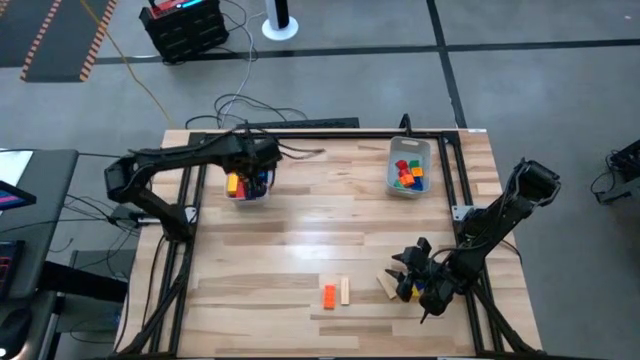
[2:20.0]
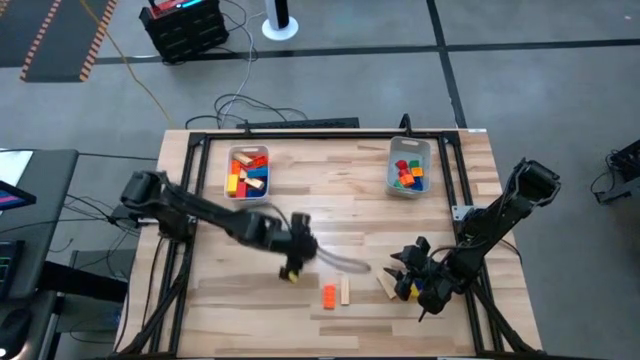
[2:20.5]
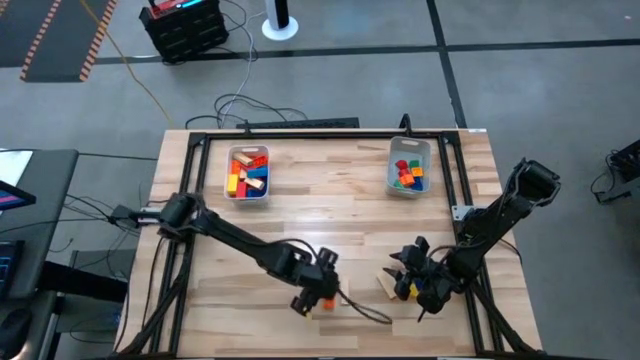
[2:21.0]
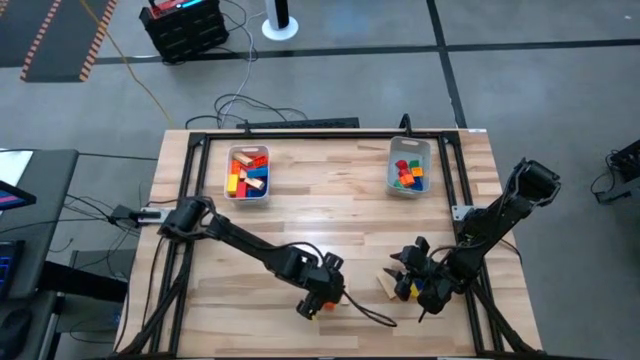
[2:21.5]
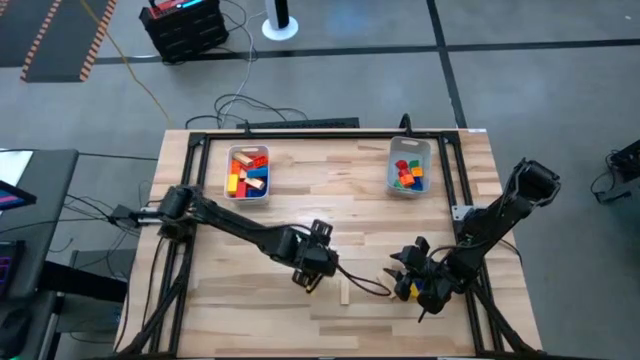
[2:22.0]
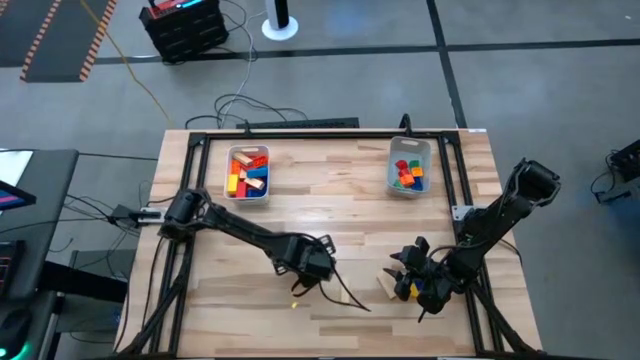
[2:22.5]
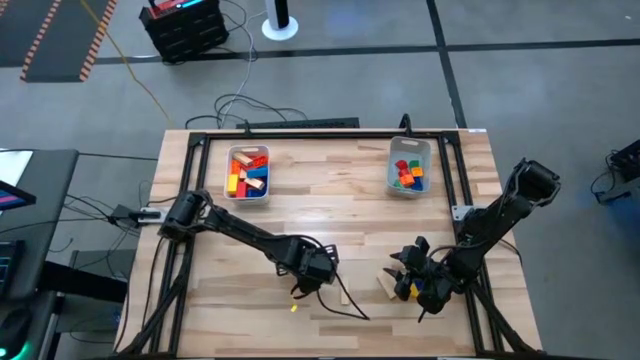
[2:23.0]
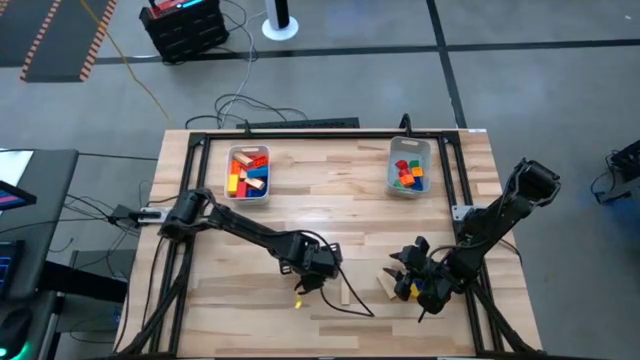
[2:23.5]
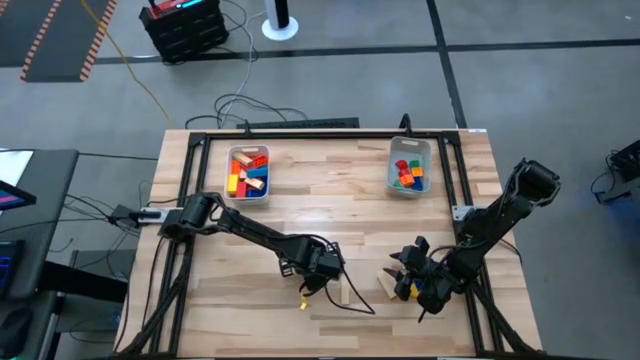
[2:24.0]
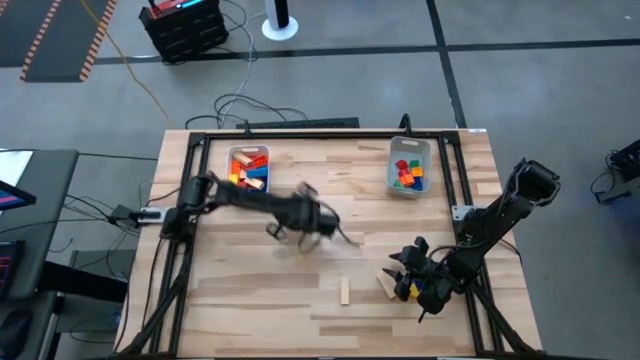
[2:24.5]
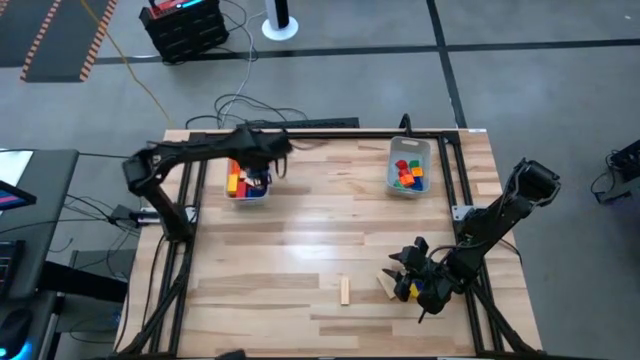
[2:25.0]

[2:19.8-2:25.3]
Task: Sort blocks by size
Put the large orange game piece into the white bin

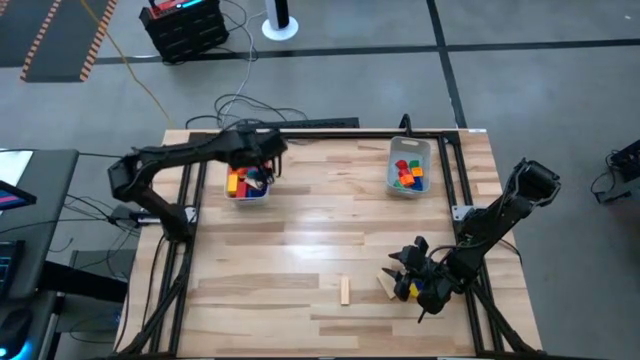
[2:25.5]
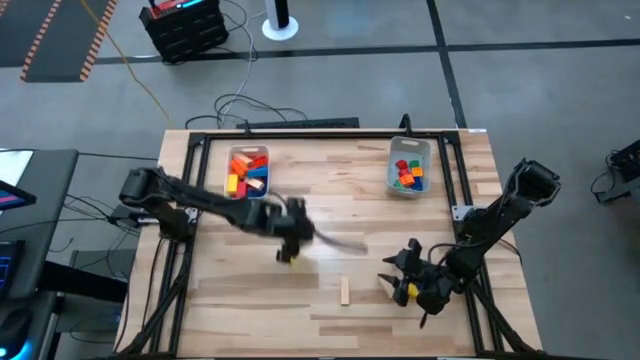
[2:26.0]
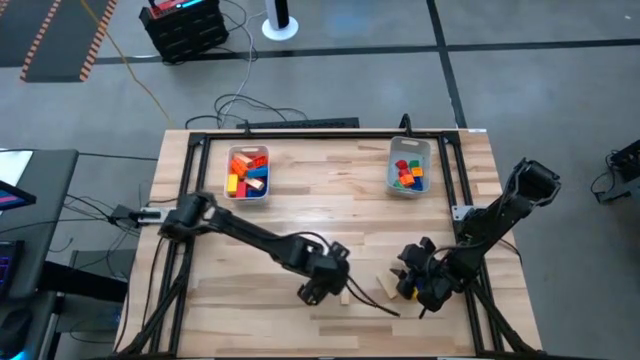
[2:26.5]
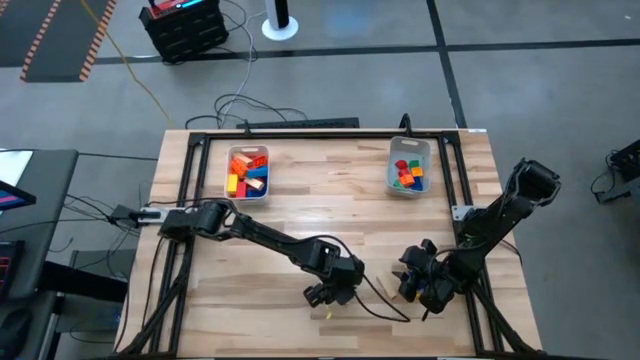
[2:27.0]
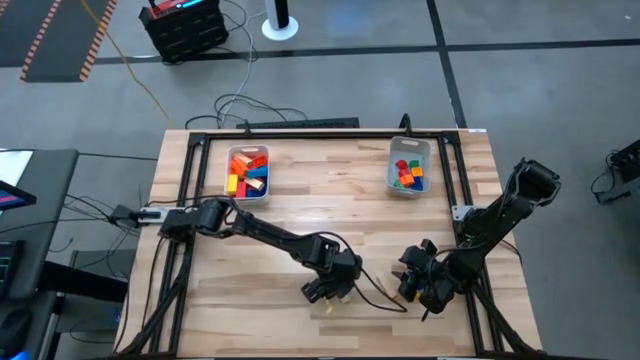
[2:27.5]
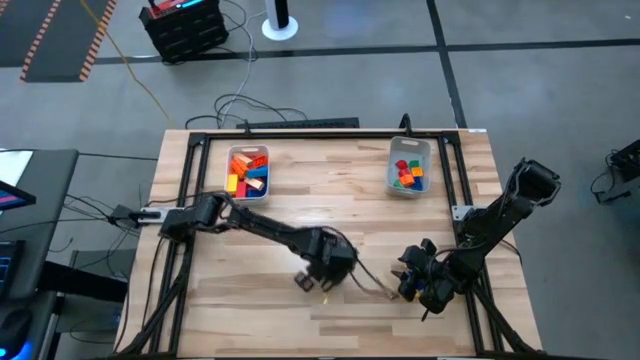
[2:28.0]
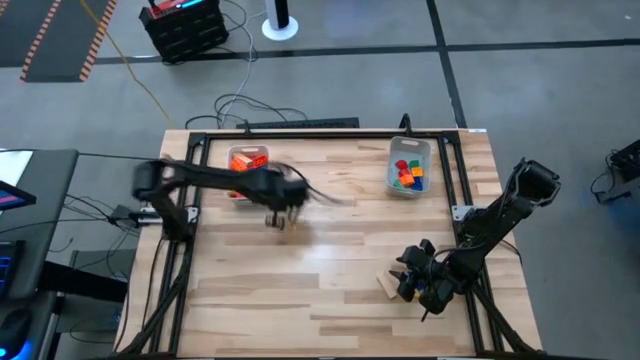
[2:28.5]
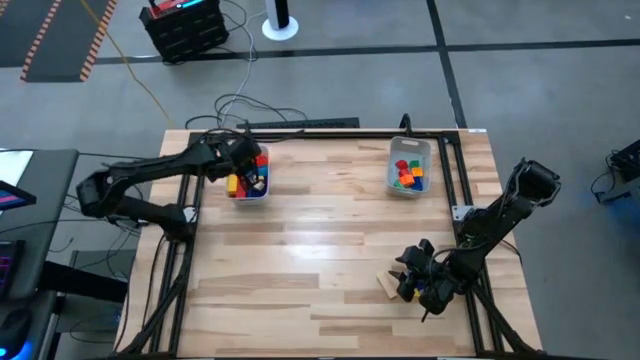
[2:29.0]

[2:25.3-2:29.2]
Put the large light brown block into the white bin

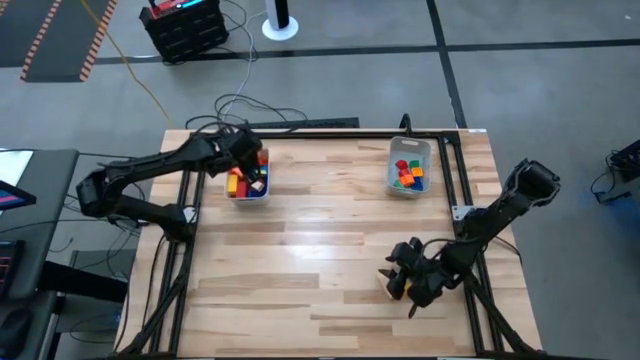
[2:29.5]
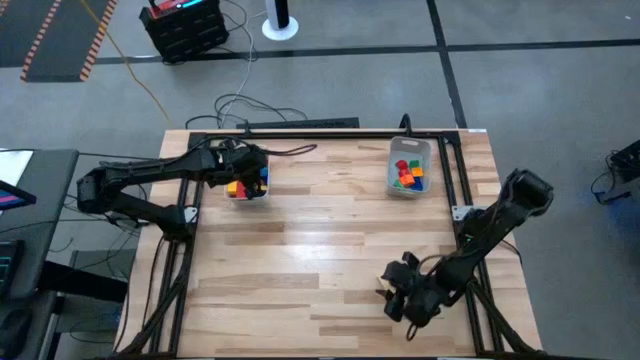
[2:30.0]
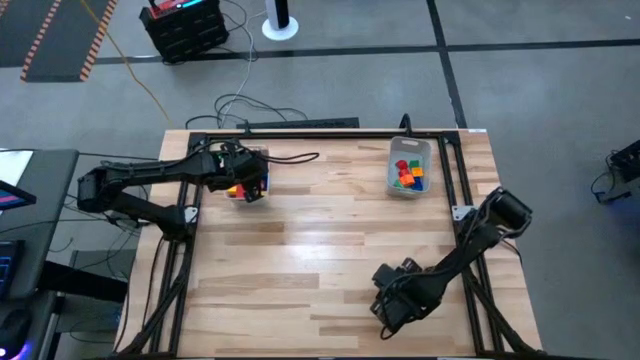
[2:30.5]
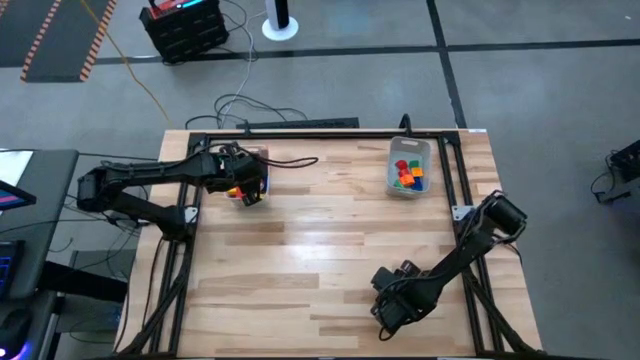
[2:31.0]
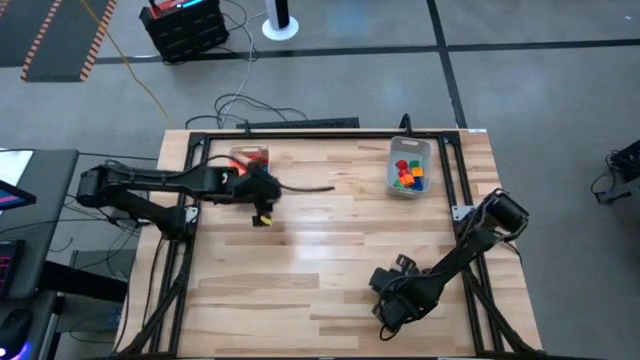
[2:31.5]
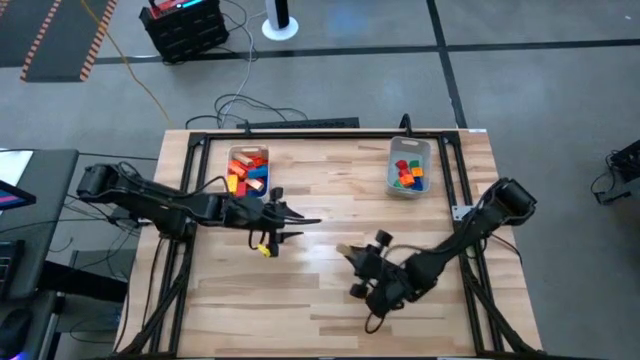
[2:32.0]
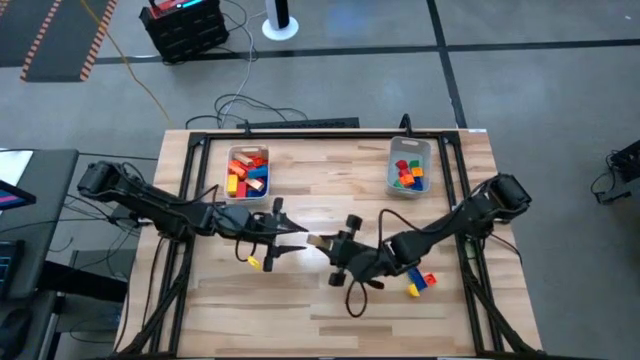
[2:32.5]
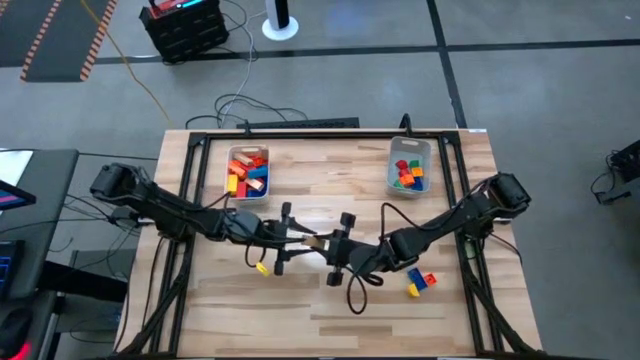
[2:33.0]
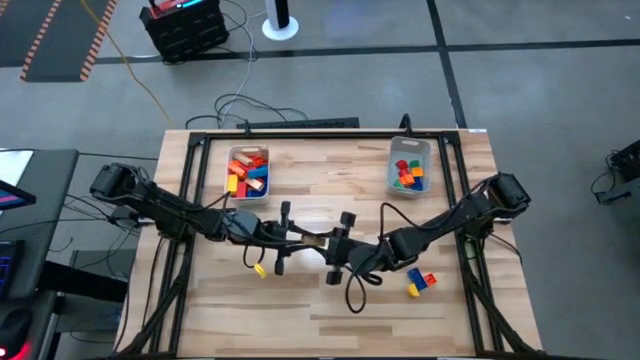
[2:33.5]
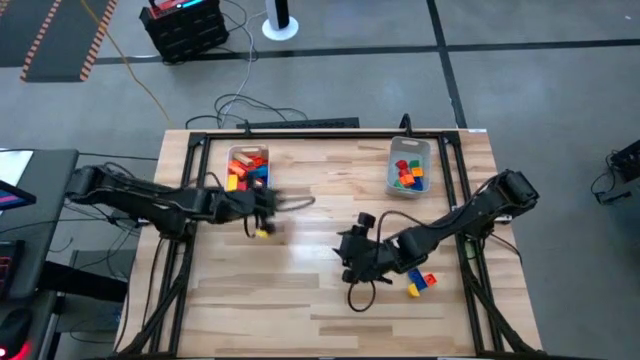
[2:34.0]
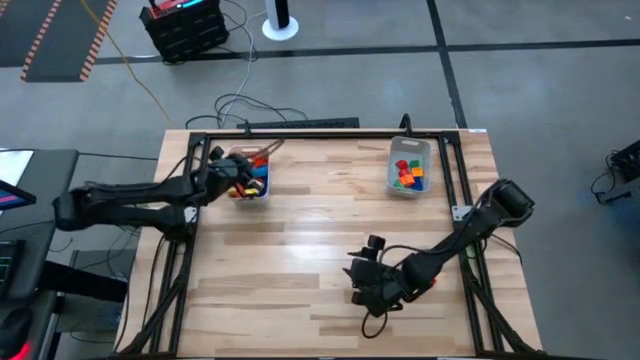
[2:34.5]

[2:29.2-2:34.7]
Put the large light brown block into the white bin

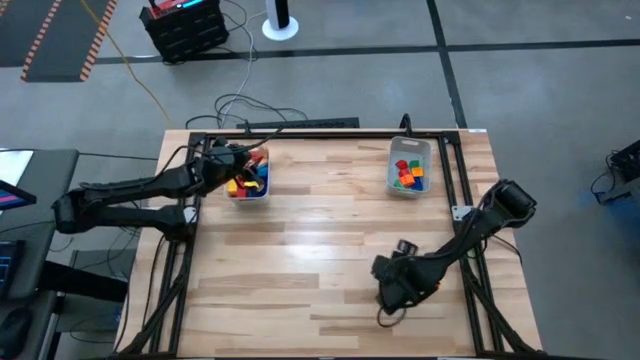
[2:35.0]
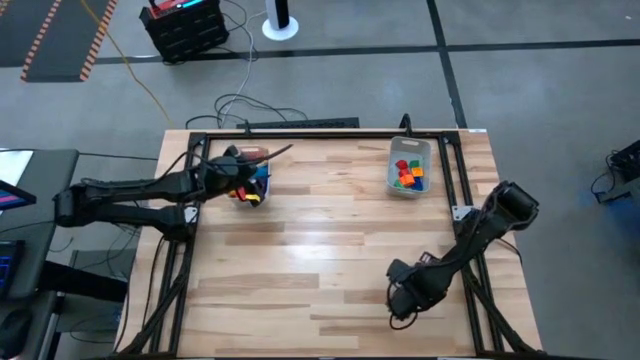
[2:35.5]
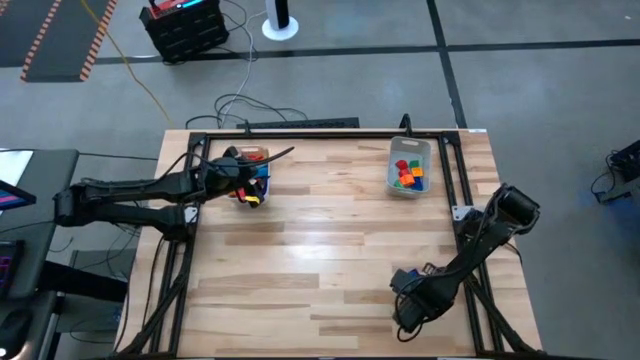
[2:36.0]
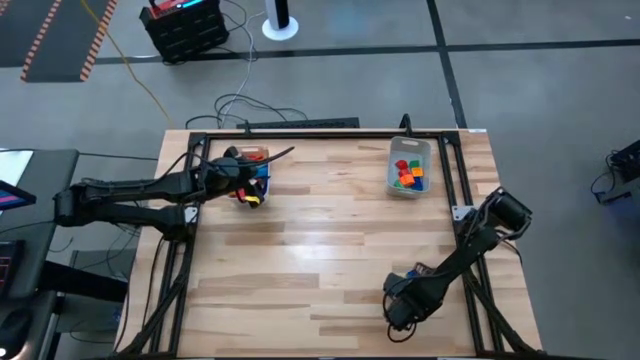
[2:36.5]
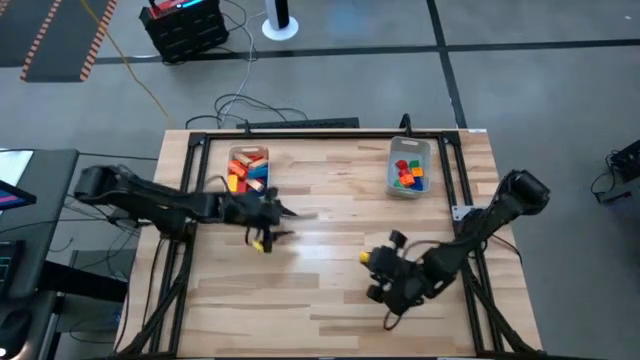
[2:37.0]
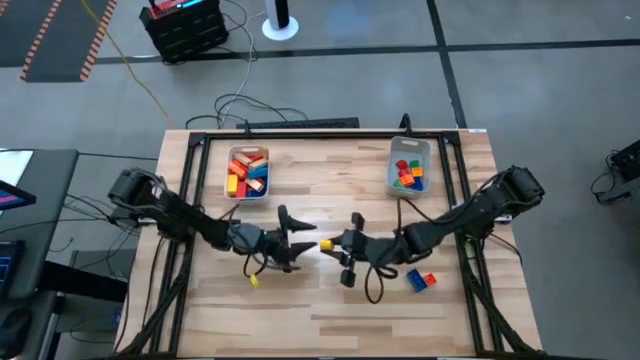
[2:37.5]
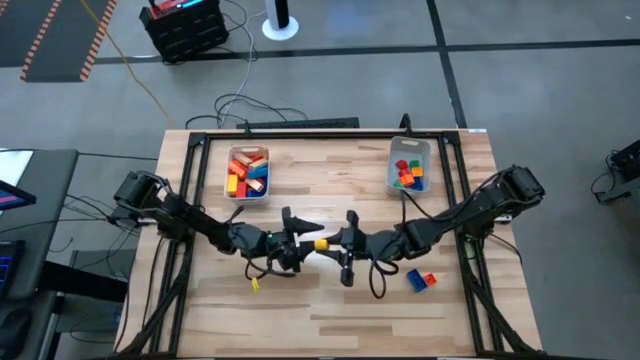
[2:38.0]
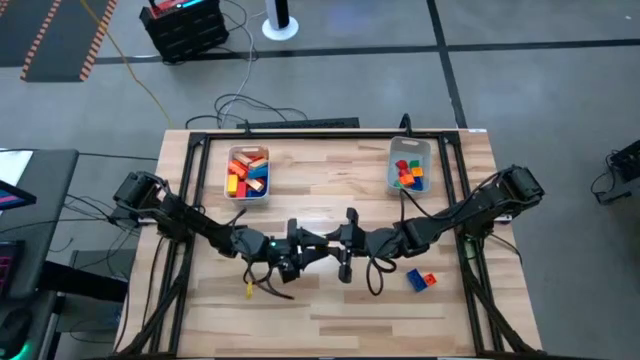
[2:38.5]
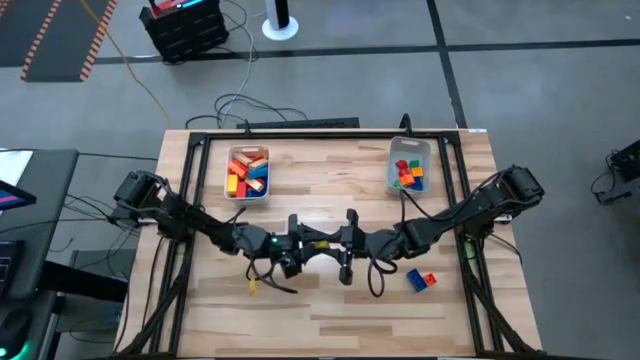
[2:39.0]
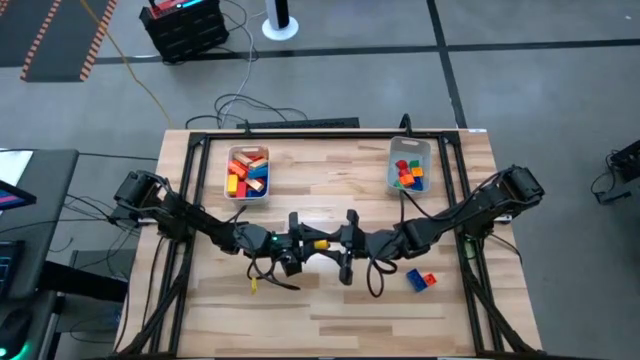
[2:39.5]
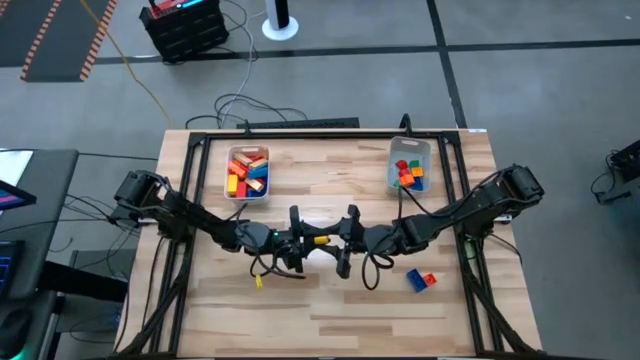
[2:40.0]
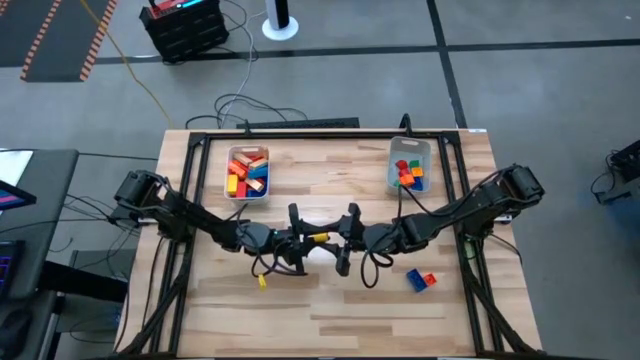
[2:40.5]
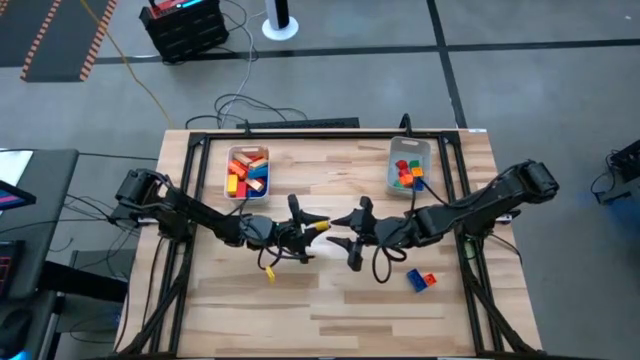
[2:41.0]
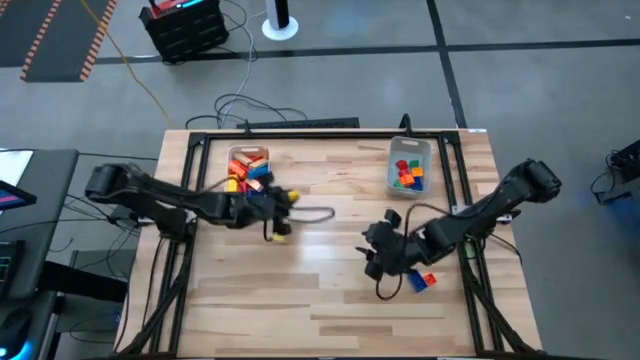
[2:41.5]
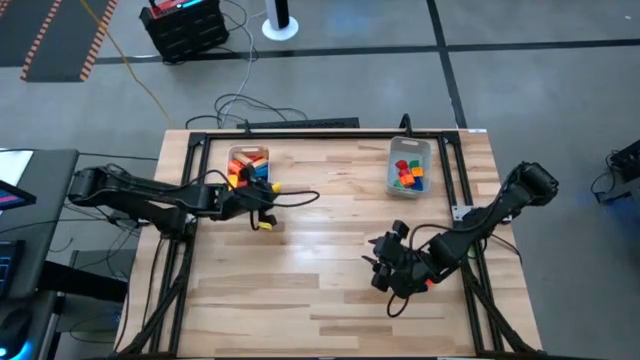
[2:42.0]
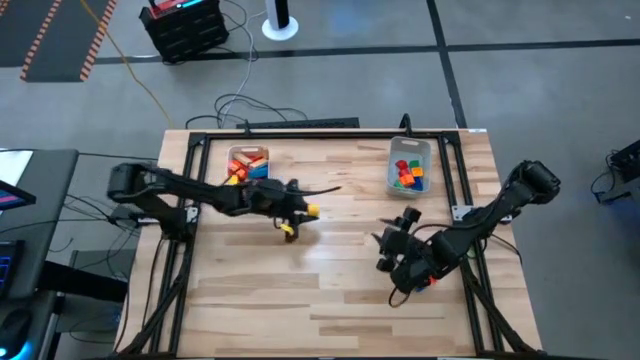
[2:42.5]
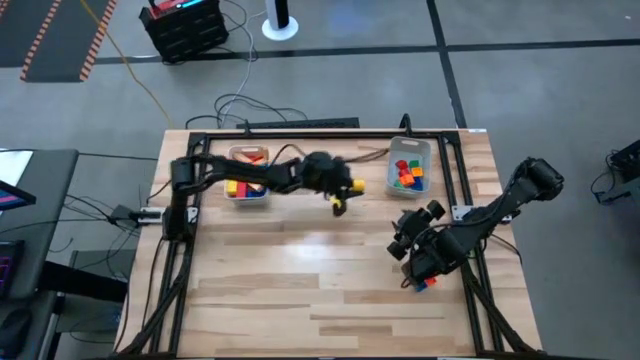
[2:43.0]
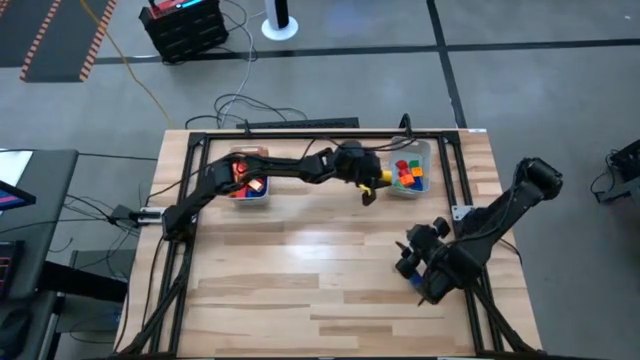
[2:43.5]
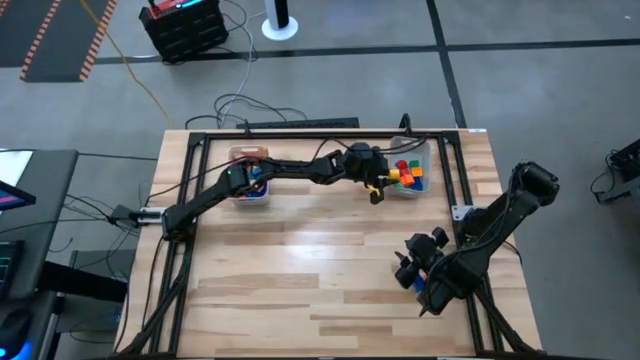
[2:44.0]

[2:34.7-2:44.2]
Put the small yellow block into the gray bin
